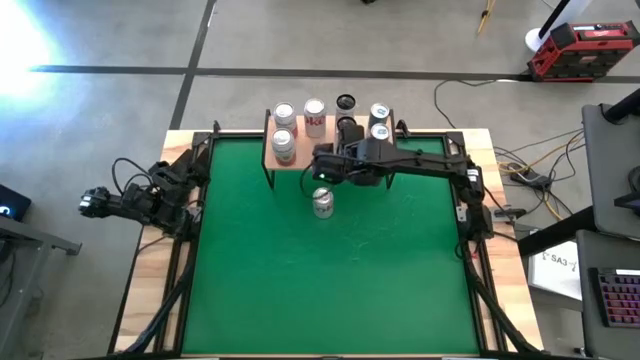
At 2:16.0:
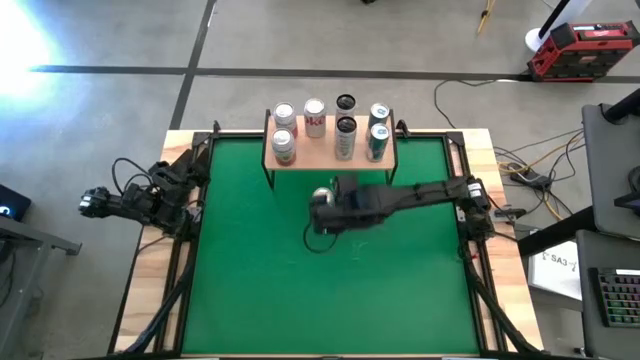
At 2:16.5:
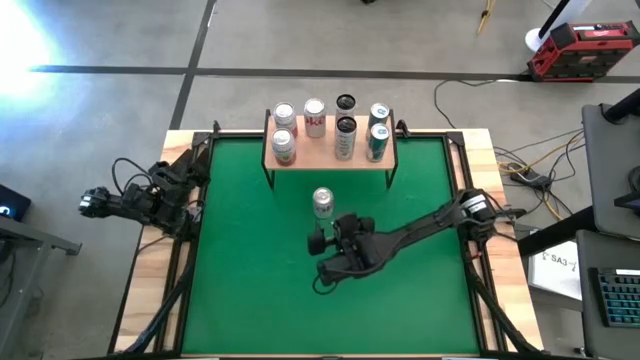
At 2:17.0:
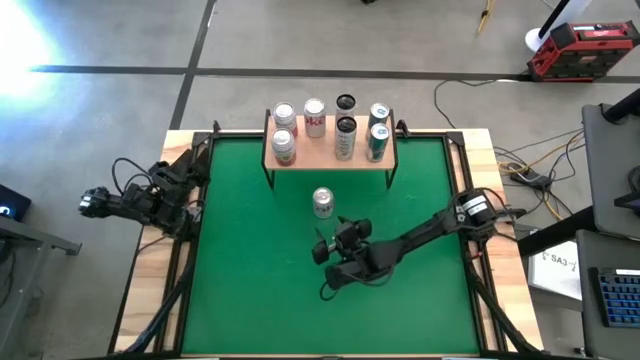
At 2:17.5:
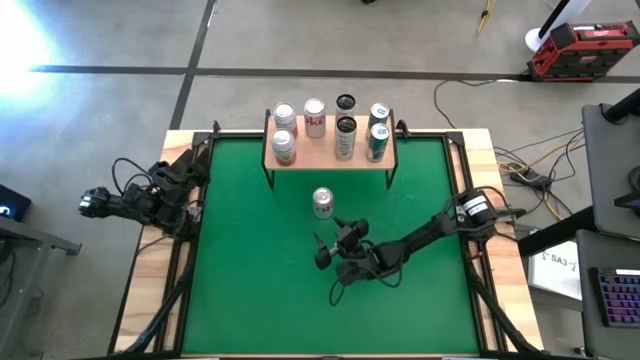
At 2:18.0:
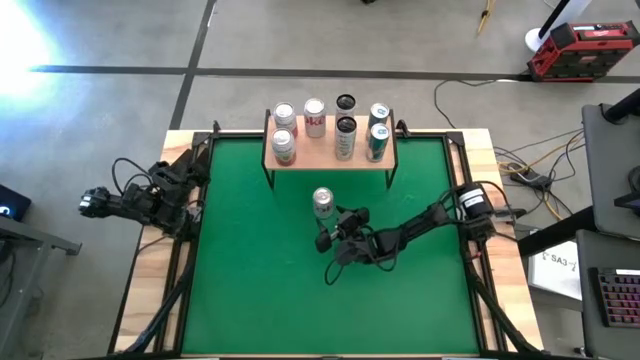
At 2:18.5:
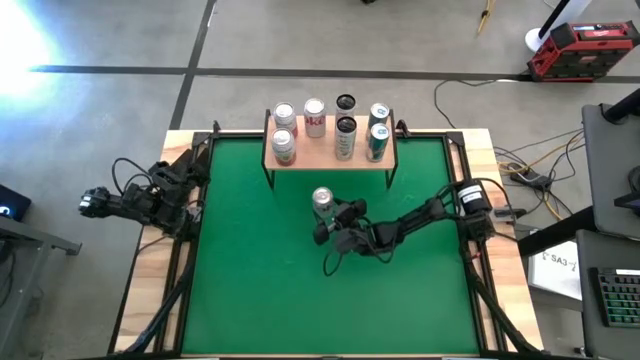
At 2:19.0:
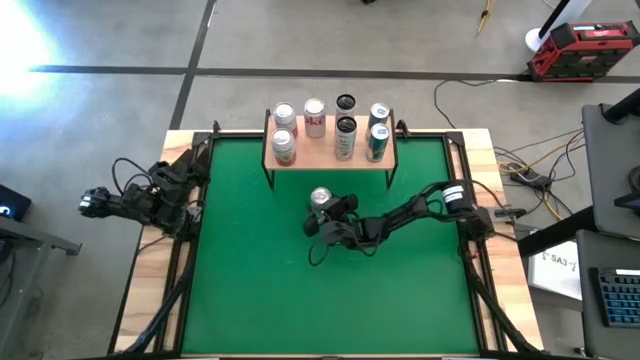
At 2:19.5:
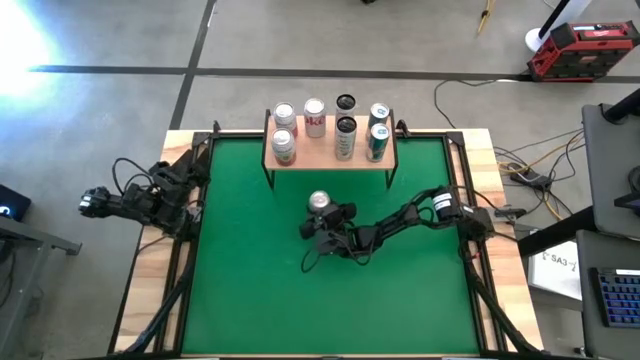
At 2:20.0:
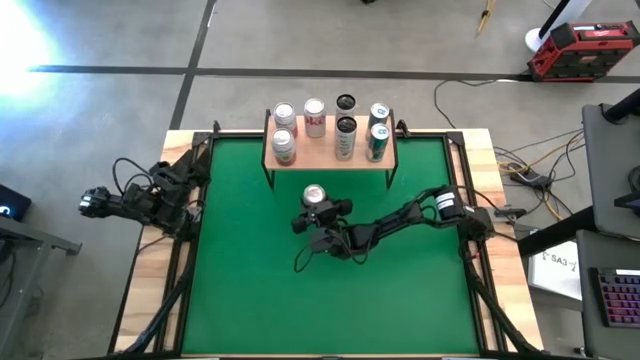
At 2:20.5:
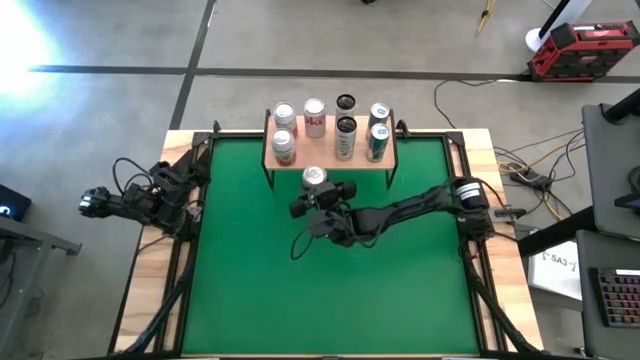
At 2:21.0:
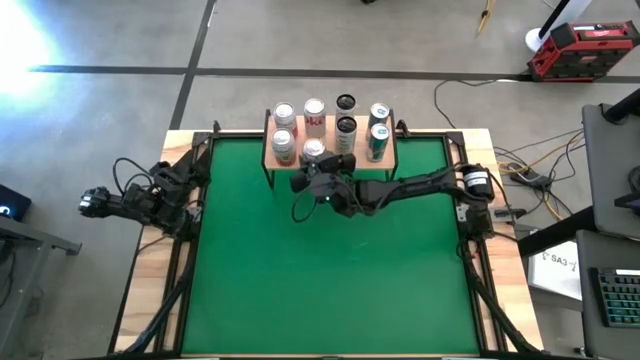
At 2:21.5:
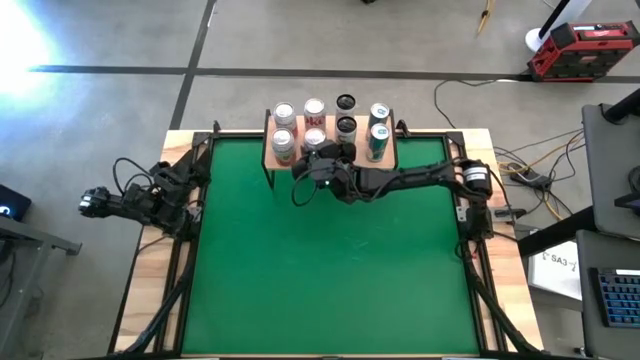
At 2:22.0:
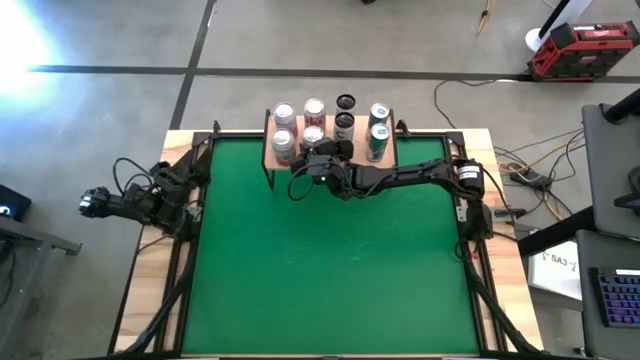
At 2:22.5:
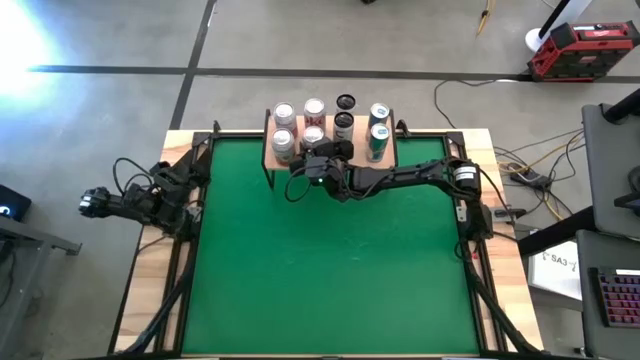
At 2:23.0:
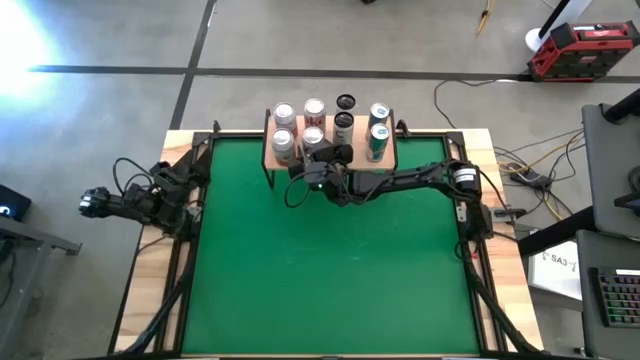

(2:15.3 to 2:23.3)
Task: Place canned beverage on shelf
Put the red-silver soda can on the shelf aligned with the other red-silver soda can

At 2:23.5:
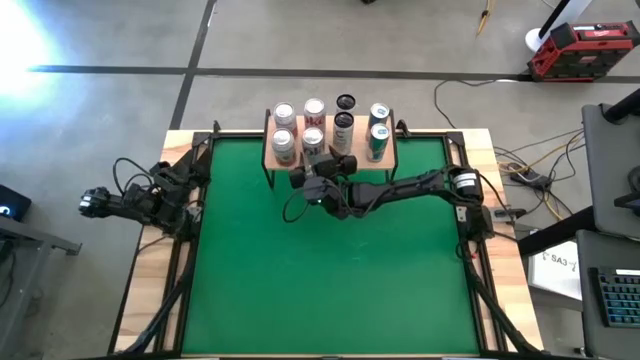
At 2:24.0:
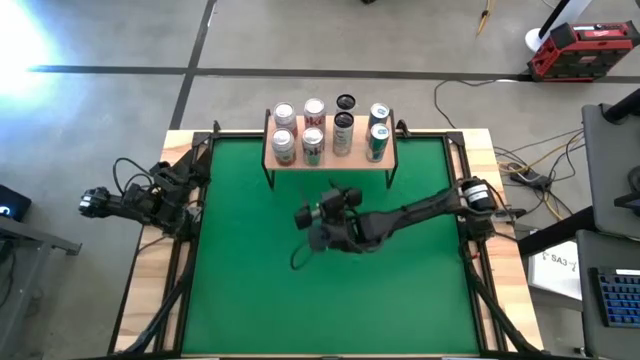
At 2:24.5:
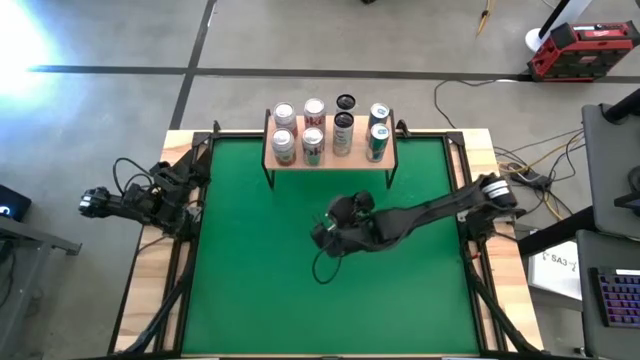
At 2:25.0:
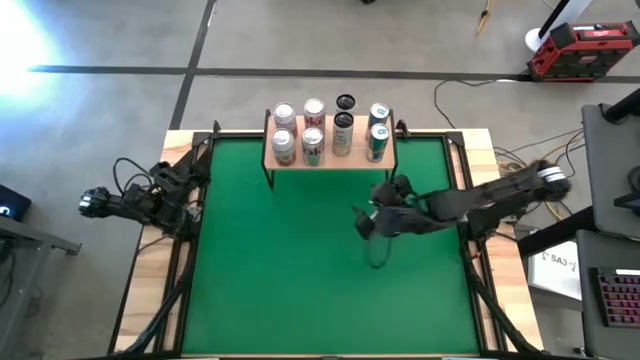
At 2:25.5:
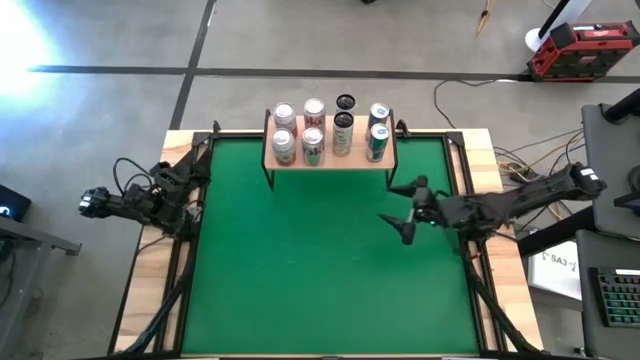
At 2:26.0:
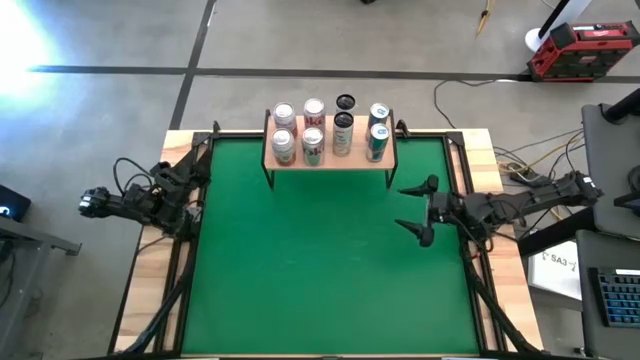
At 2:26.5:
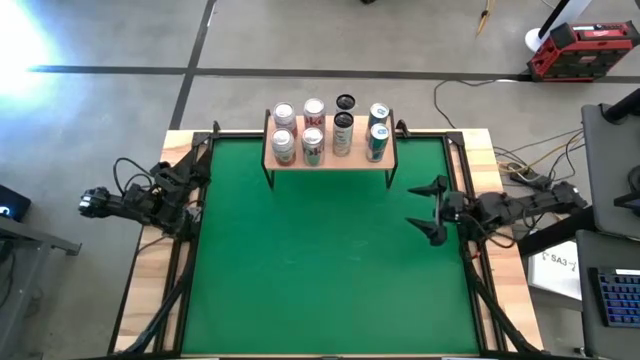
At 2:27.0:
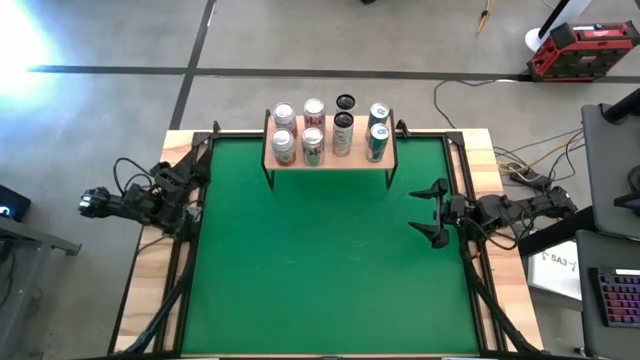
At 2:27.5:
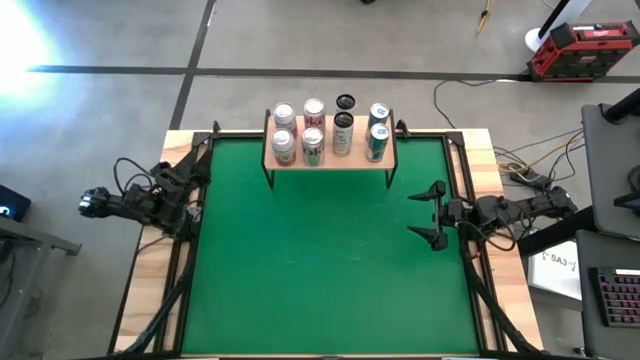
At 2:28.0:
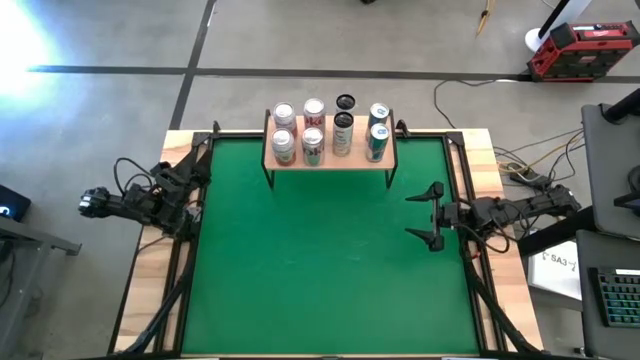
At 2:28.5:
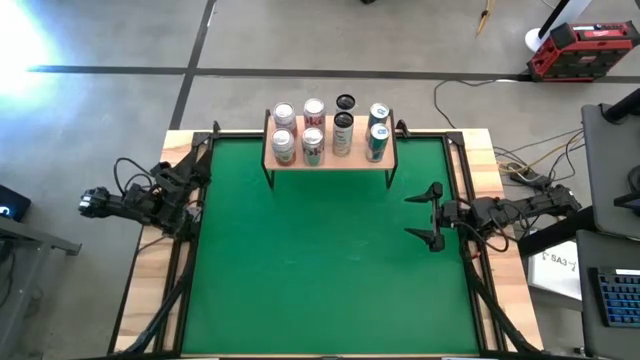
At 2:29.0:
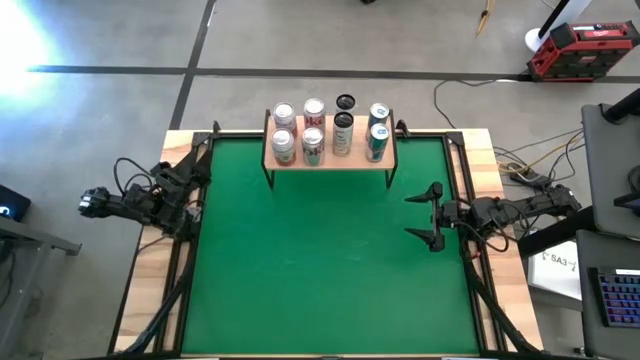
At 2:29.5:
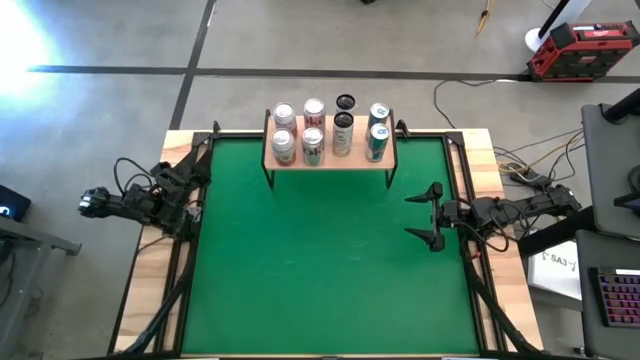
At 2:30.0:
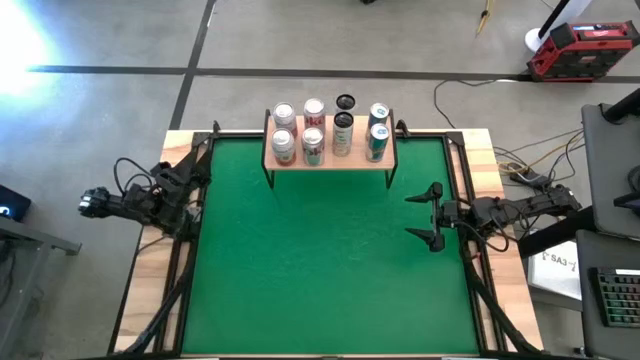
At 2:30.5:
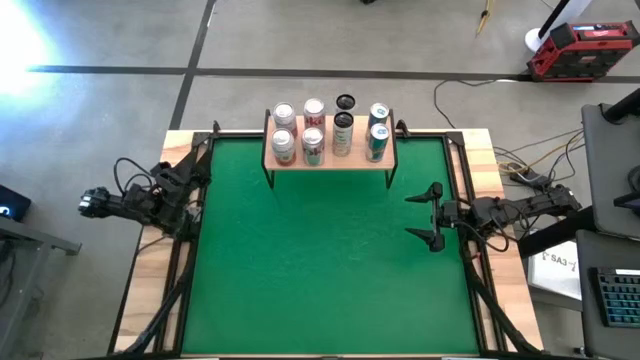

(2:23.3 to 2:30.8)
Return to Home Position

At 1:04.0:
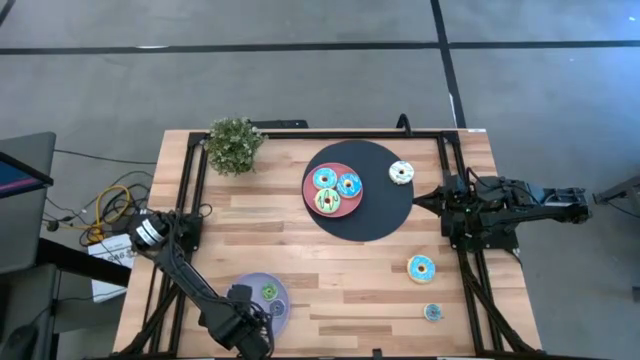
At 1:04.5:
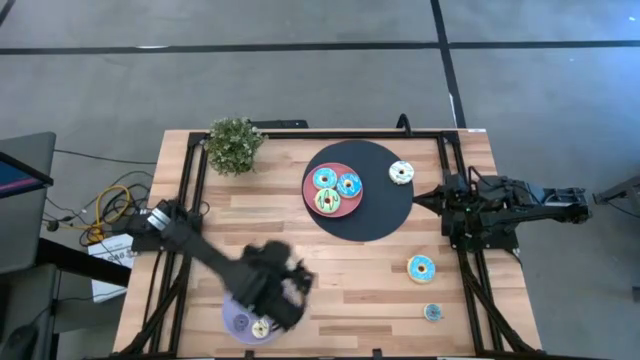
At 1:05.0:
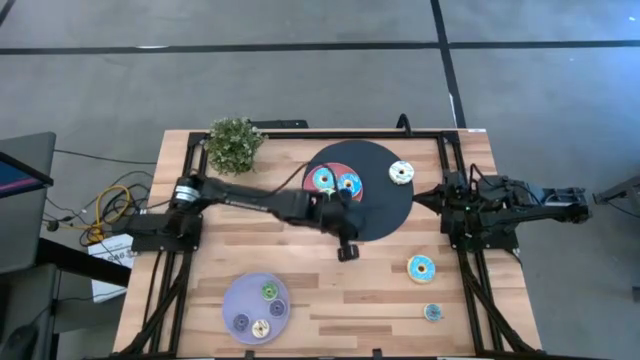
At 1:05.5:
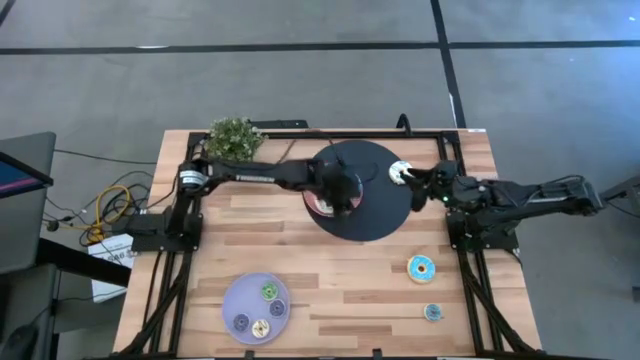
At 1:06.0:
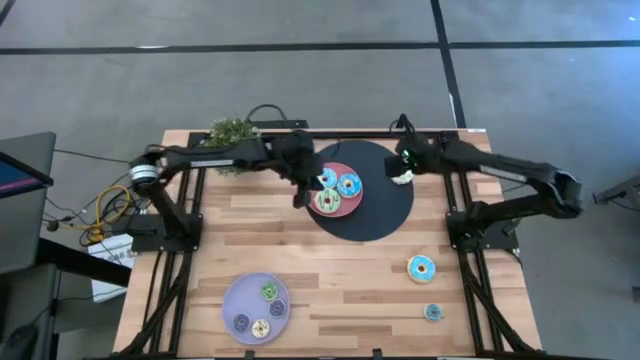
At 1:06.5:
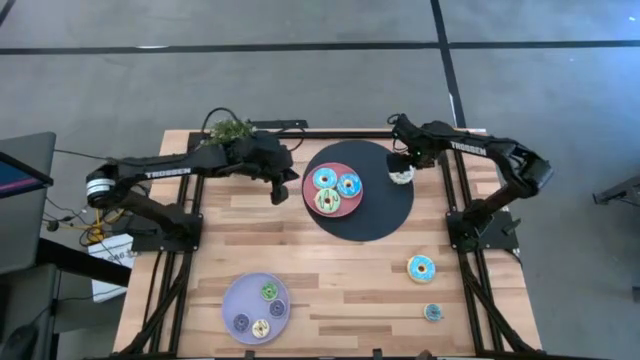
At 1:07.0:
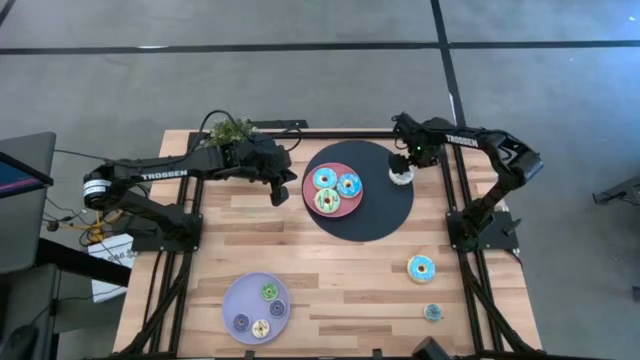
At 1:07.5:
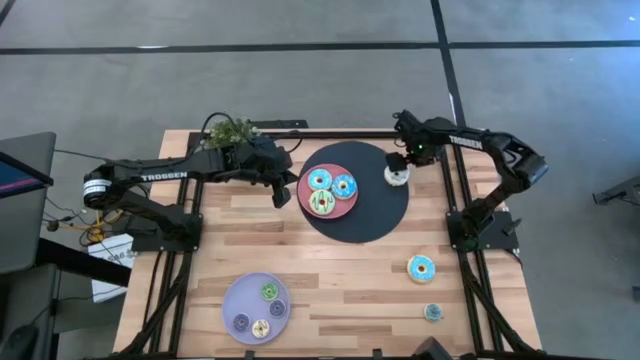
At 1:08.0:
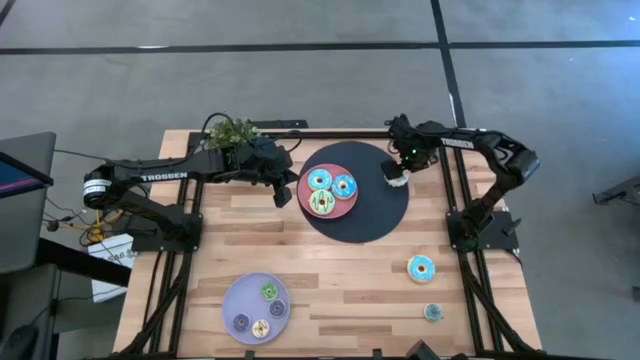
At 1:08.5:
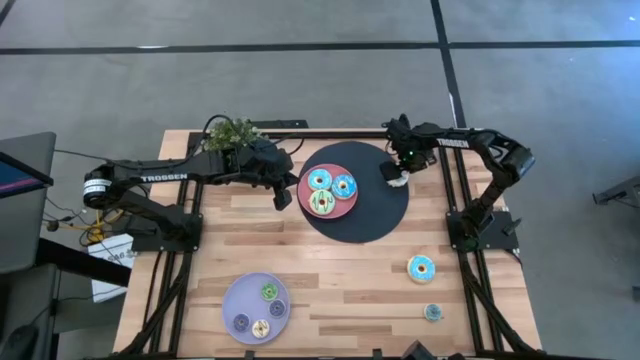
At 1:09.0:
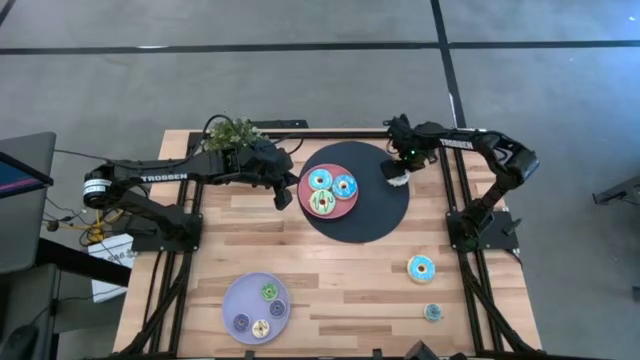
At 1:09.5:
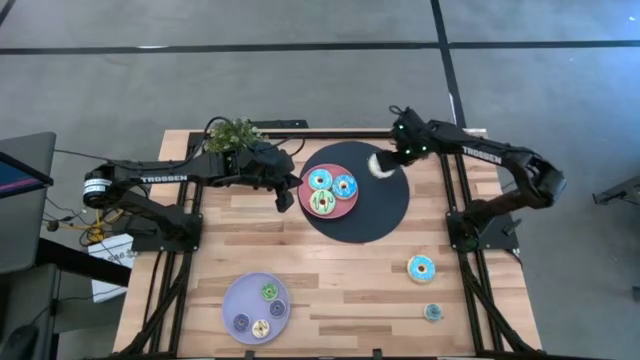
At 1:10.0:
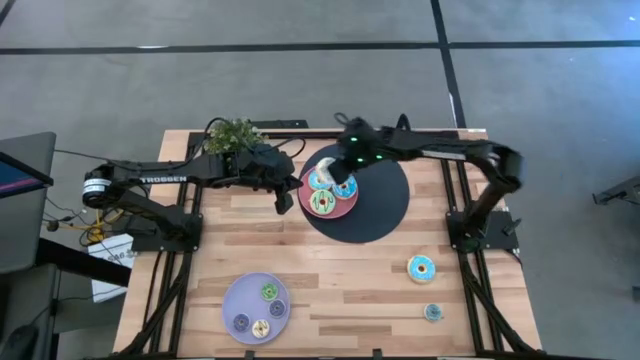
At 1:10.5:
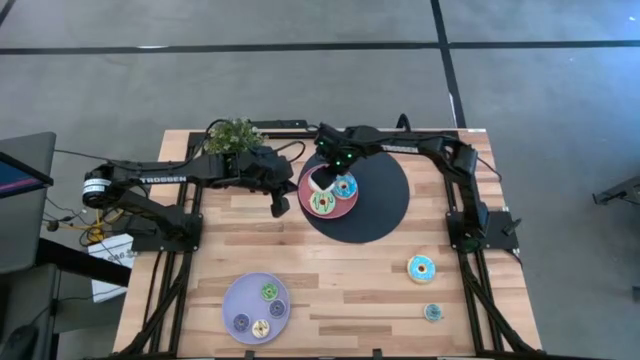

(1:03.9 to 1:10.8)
Task: Pick & Place donuts
Put the big white donut on the pink plate
